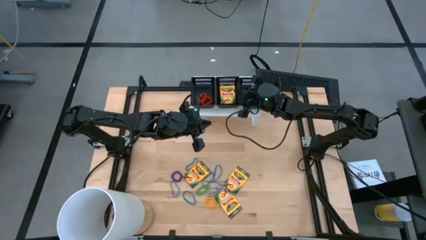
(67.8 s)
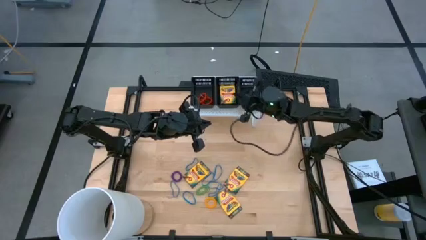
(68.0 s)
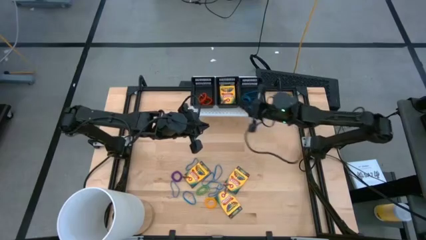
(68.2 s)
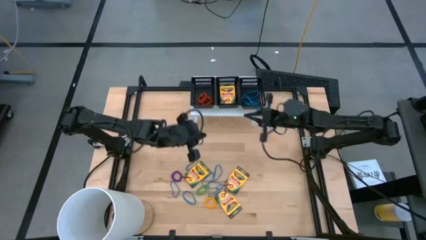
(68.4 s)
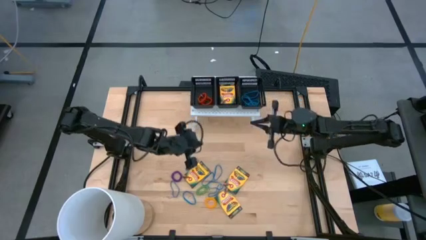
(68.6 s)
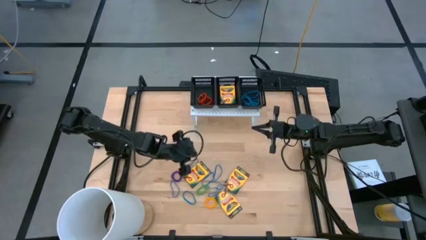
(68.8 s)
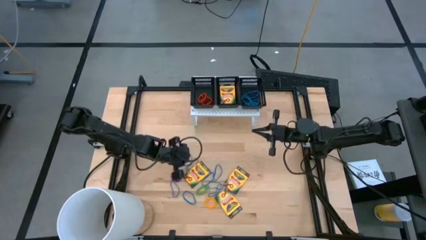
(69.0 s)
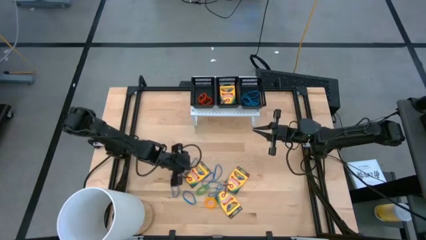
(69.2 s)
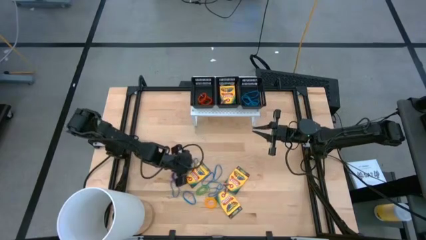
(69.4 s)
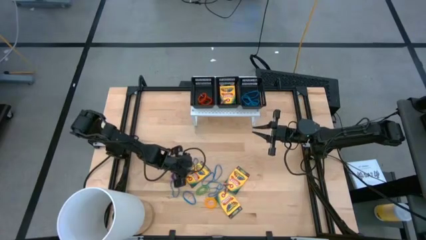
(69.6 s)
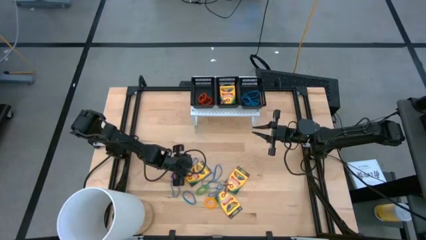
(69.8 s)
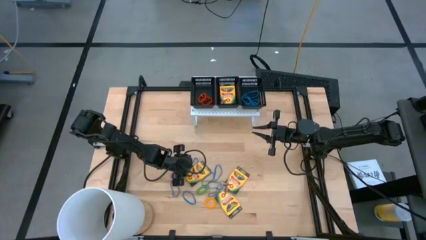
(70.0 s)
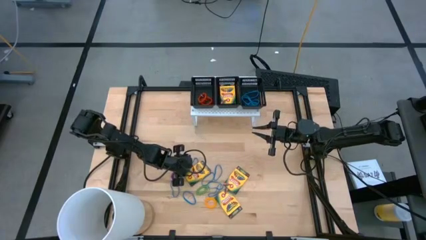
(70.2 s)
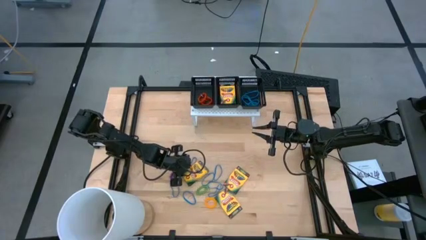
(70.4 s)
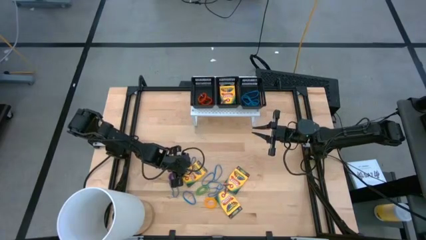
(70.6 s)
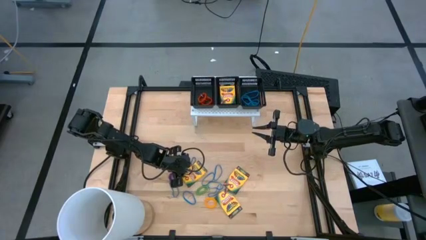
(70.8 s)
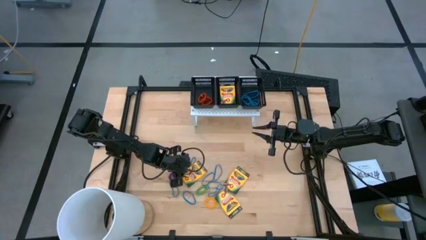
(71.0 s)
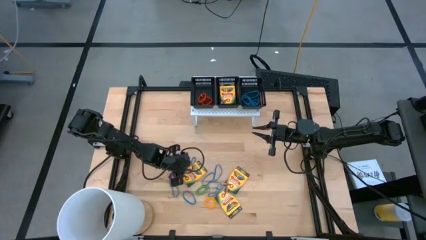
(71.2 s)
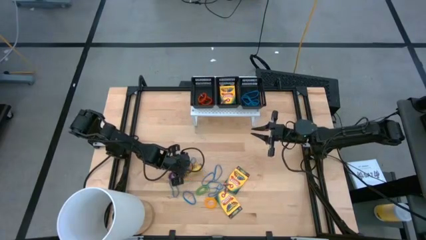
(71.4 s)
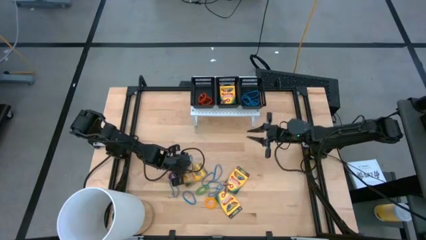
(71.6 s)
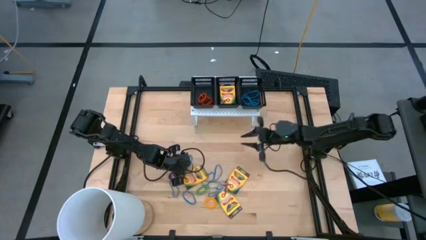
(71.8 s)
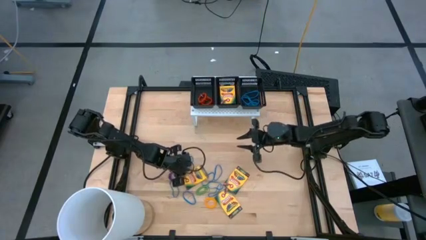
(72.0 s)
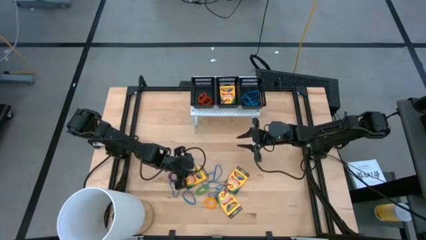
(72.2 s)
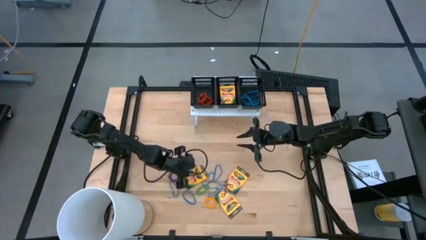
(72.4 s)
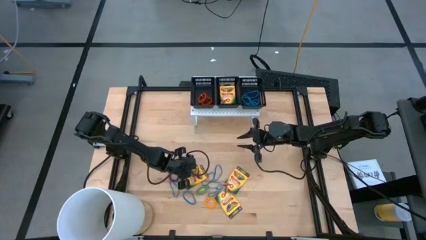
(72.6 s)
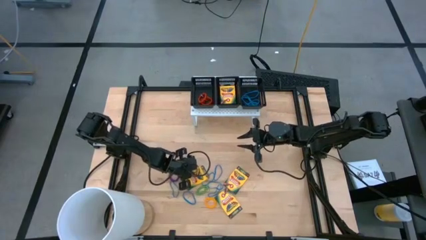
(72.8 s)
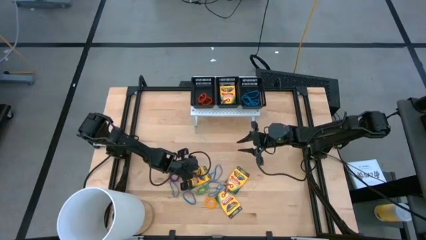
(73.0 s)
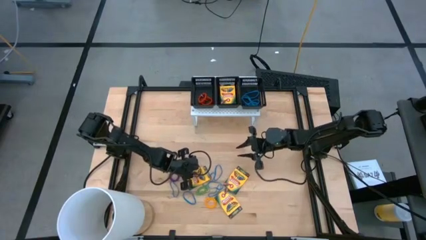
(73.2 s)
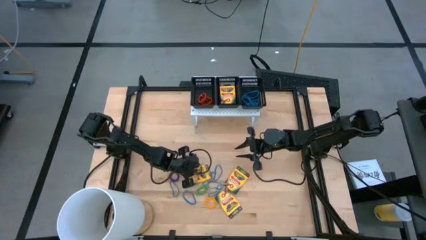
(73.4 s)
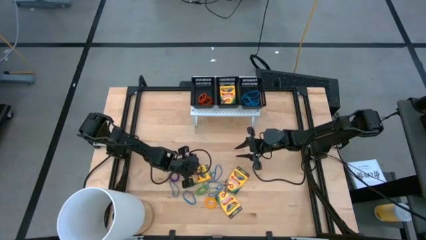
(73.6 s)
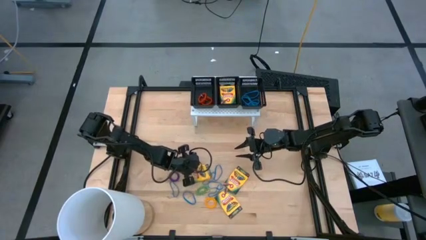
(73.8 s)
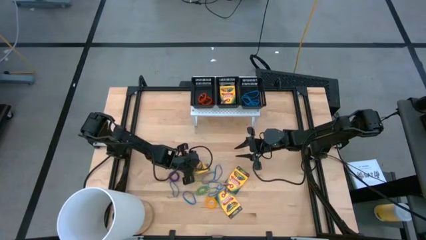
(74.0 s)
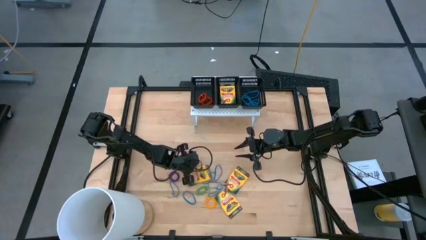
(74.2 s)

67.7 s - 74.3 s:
Task: Pick & Place Office Desk Supplies
Put the crayon box into the middle black bin on the shelf

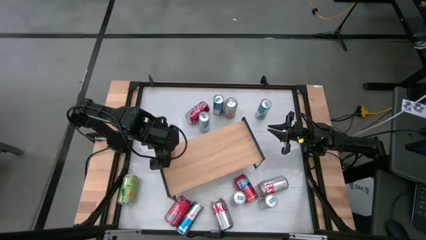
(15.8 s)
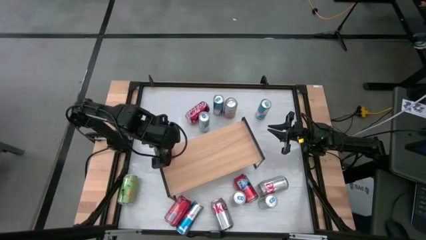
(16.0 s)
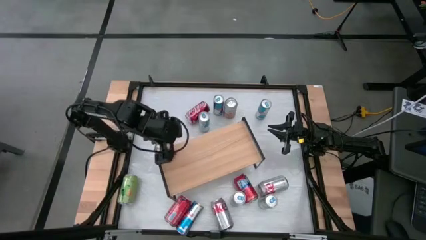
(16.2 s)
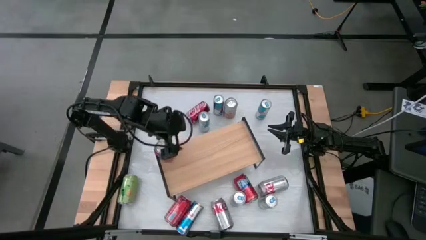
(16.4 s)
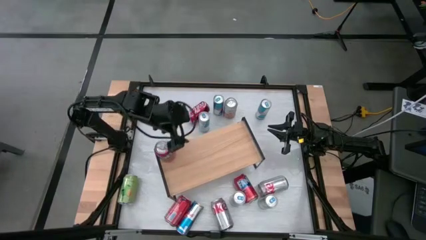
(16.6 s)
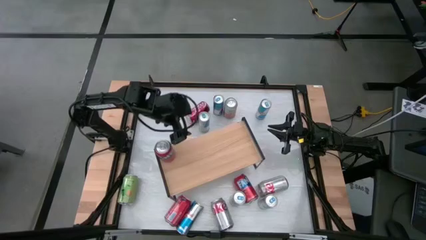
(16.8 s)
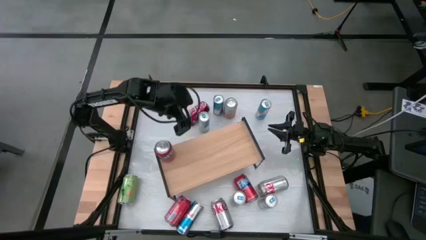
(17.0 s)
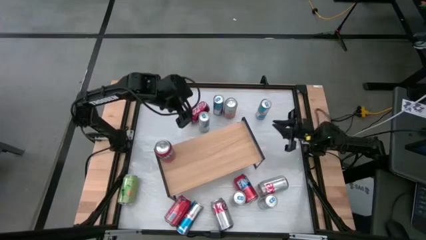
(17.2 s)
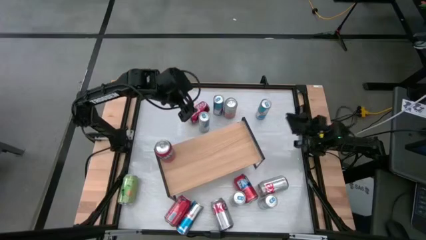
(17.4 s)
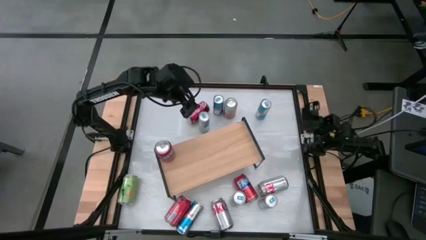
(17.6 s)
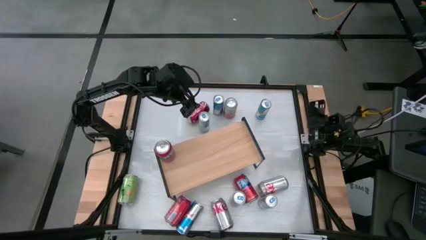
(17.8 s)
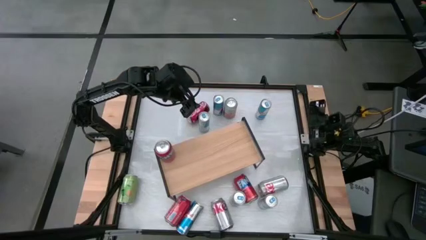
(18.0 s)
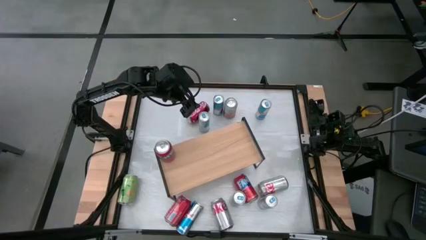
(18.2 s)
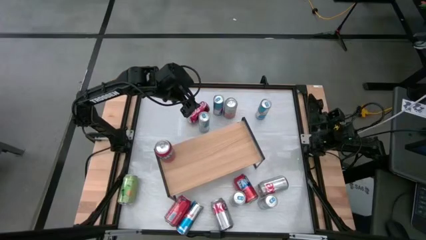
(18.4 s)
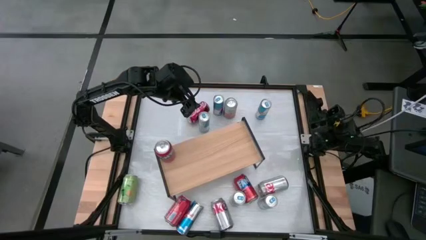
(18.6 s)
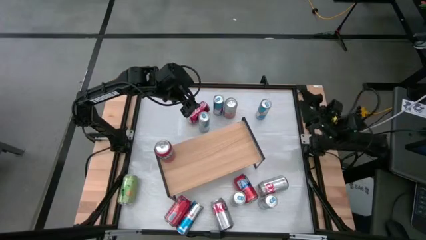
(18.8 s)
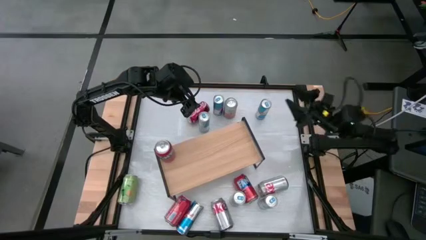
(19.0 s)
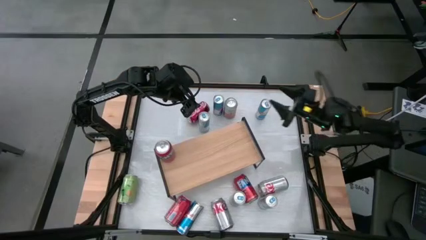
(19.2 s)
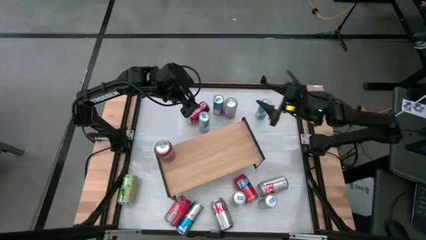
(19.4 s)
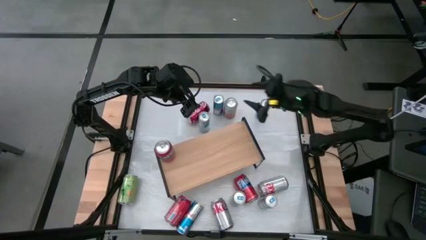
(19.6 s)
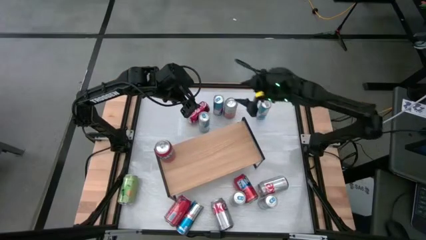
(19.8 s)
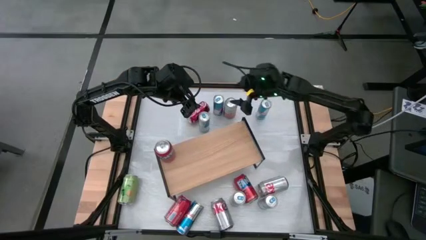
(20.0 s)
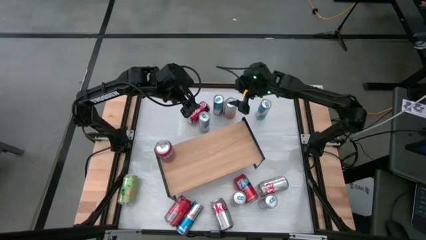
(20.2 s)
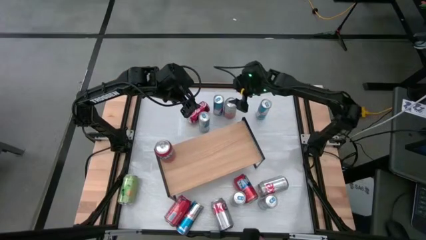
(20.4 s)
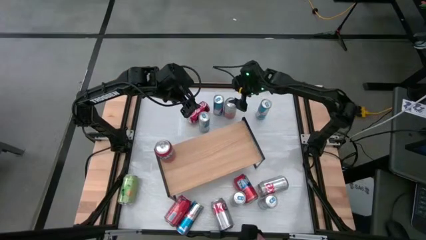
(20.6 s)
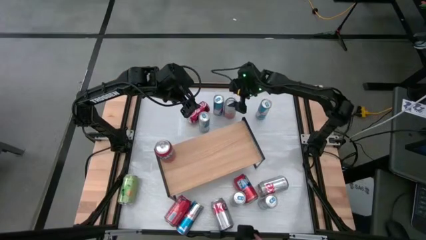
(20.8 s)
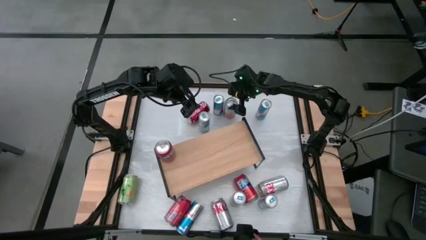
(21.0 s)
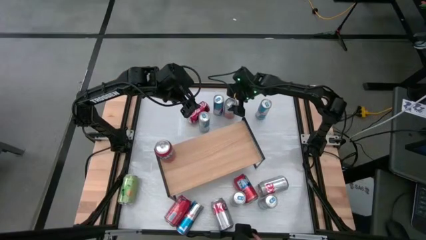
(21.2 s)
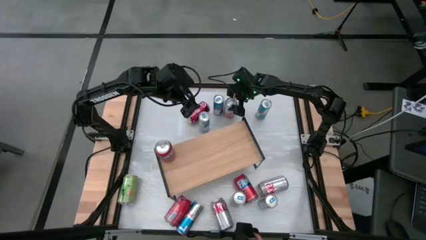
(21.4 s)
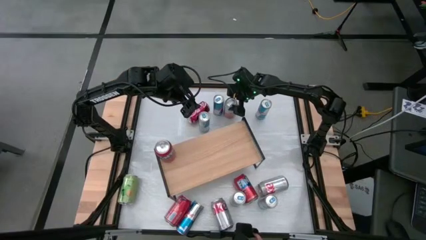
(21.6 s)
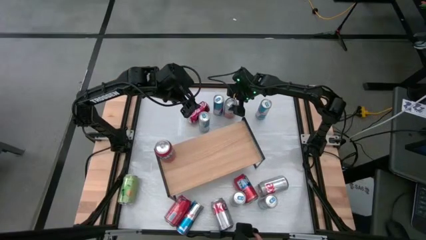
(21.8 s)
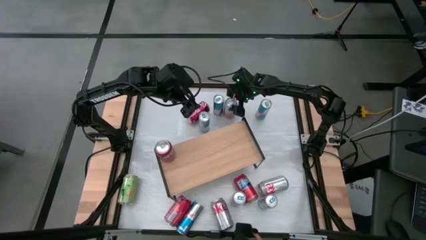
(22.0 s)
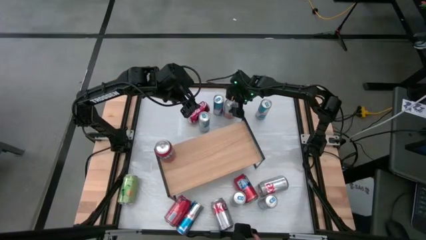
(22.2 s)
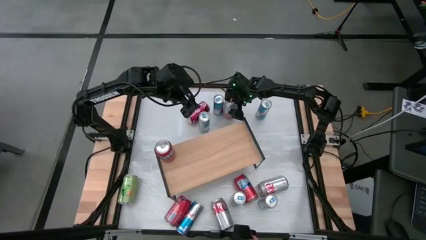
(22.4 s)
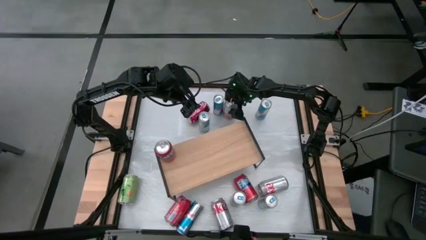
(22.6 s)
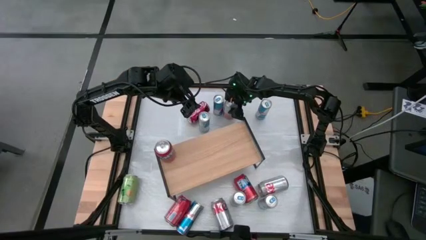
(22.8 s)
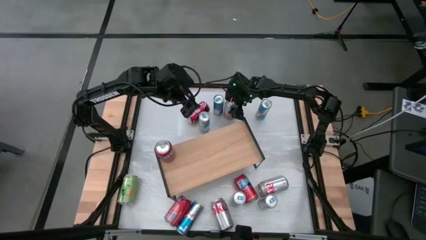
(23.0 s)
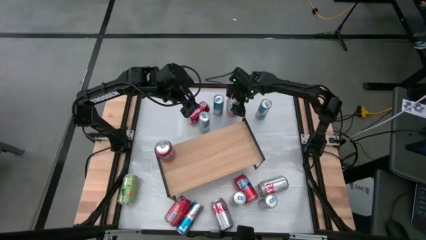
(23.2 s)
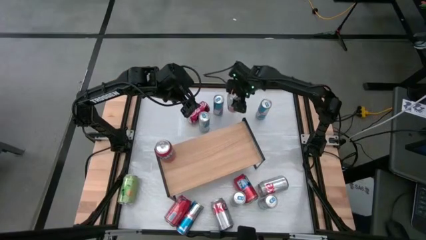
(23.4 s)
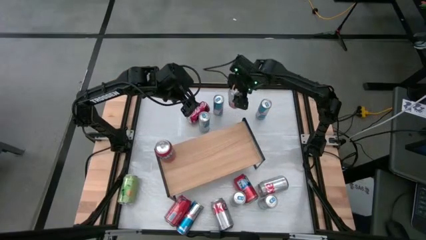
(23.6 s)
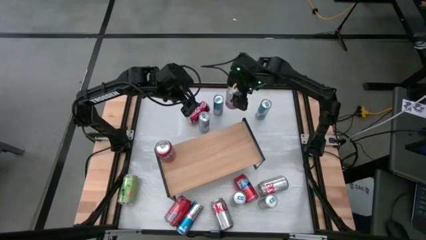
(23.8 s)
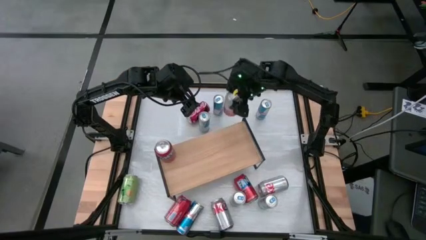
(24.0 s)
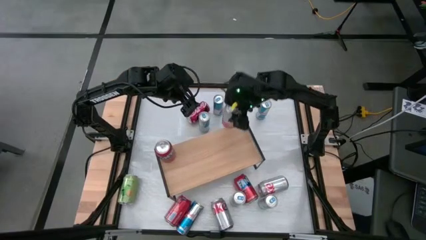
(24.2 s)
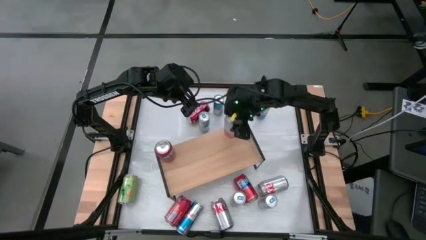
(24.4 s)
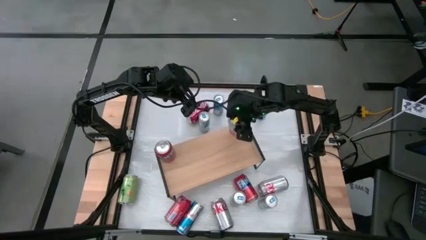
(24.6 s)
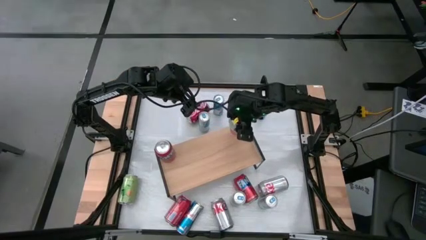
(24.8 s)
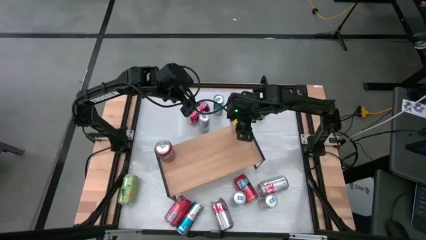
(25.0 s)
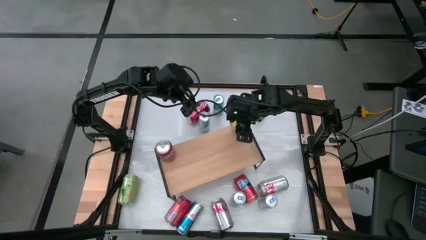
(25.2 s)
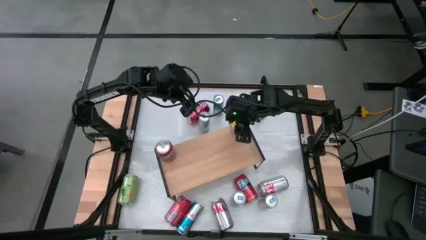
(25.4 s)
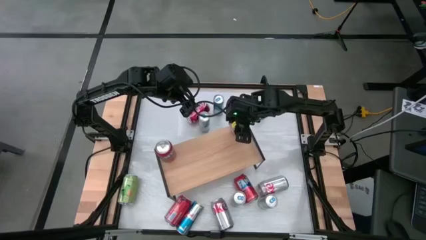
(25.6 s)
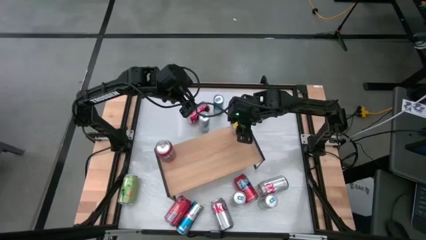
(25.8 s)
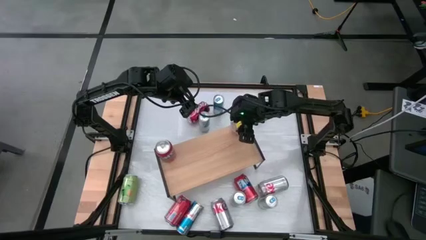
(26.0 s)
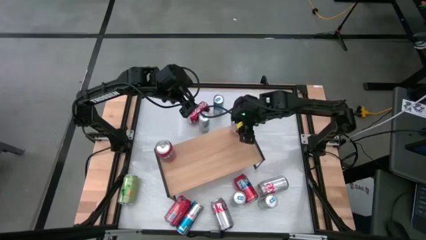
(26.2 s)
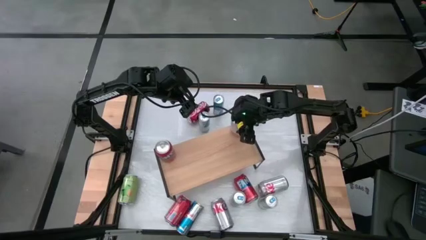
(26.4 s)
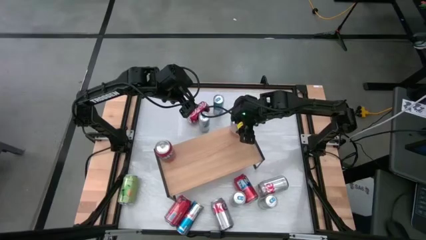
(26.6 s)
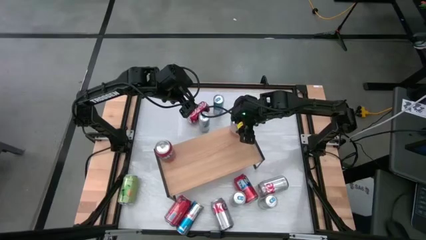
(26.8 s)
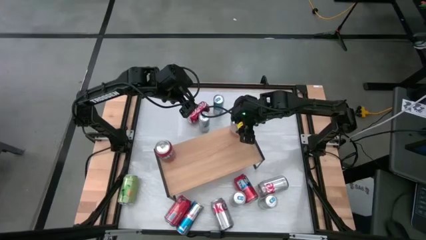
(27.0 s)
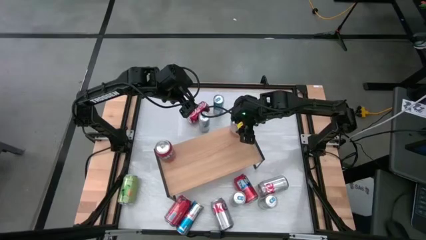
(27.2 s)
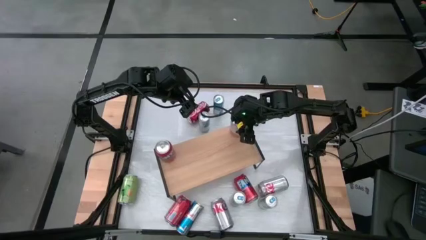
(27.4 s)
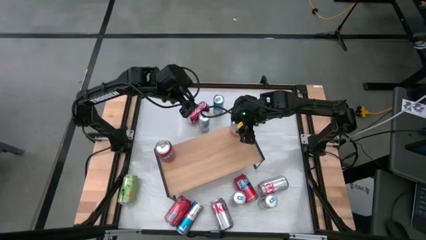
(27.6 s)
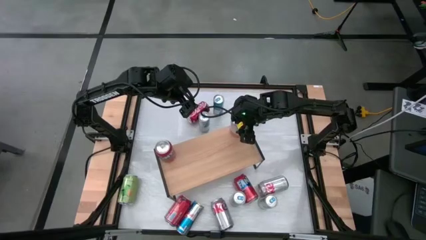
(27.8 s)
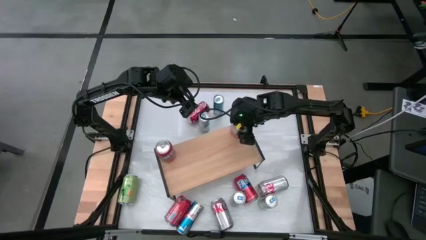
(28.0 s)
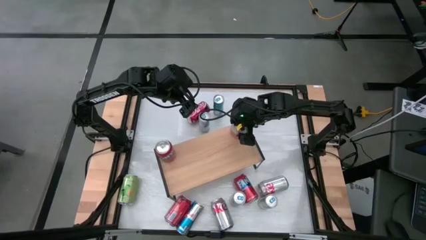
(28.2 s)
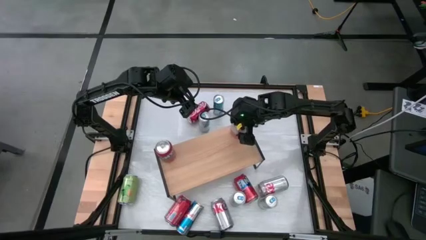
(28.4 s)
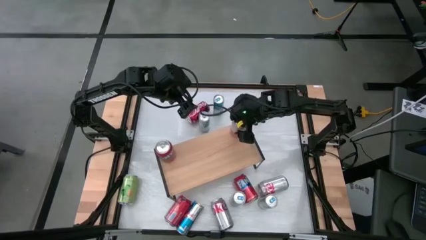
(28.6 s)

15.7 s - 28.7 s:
Task: Place canned beverage on shelf
Put the orange white soda can on the shelf
